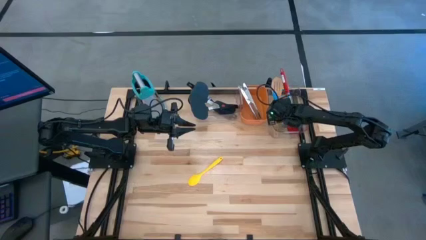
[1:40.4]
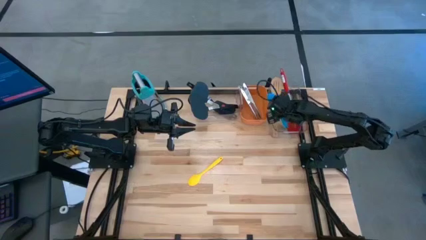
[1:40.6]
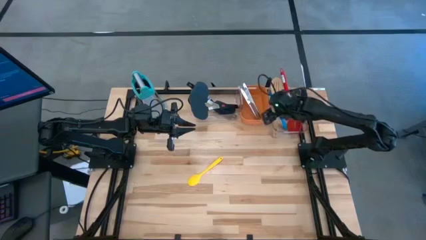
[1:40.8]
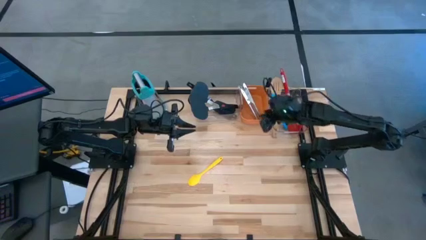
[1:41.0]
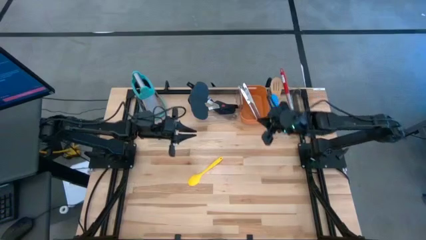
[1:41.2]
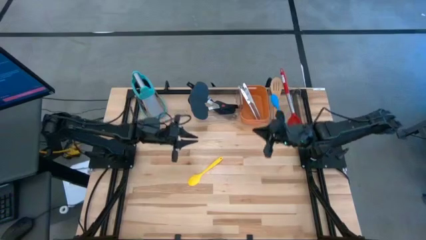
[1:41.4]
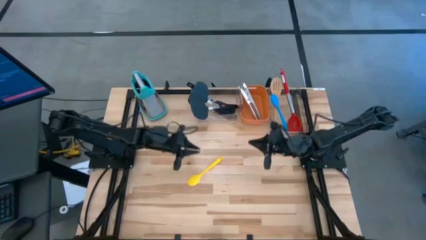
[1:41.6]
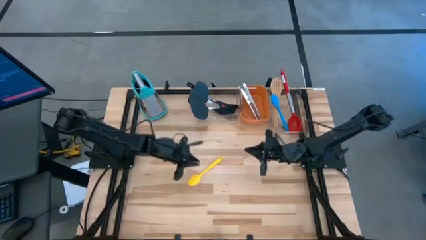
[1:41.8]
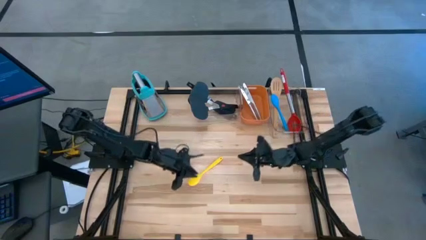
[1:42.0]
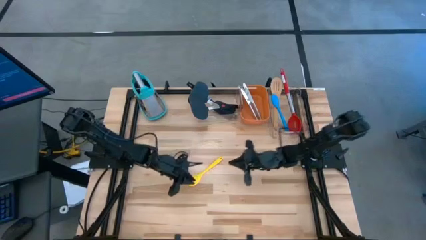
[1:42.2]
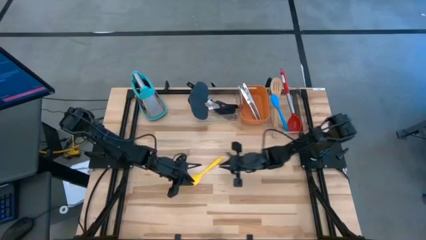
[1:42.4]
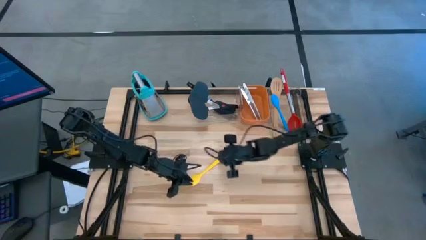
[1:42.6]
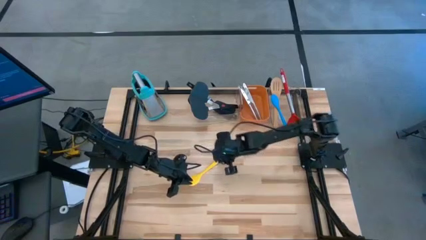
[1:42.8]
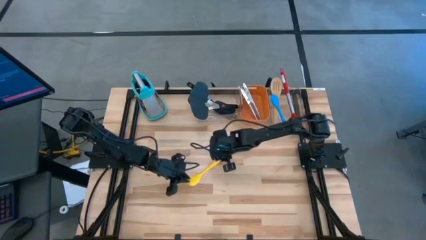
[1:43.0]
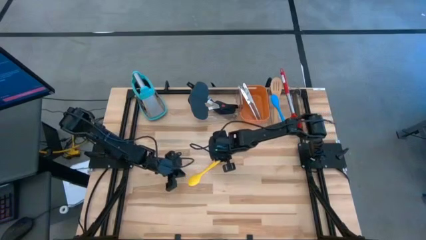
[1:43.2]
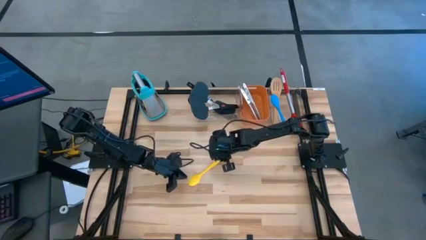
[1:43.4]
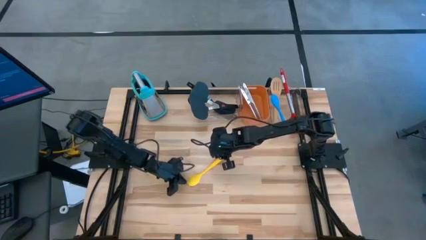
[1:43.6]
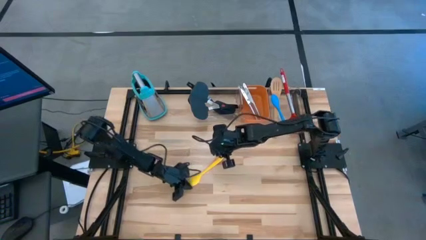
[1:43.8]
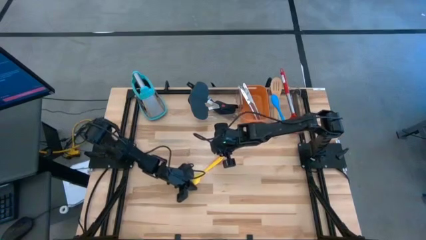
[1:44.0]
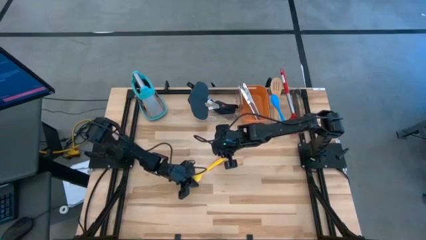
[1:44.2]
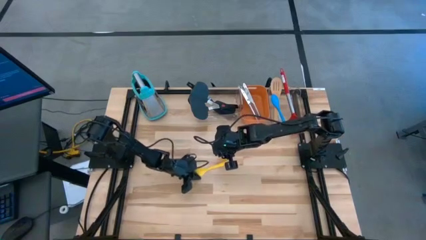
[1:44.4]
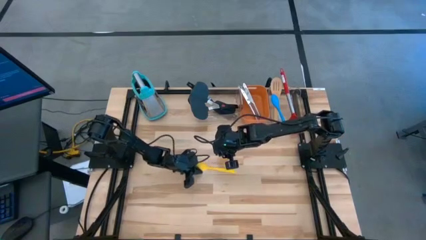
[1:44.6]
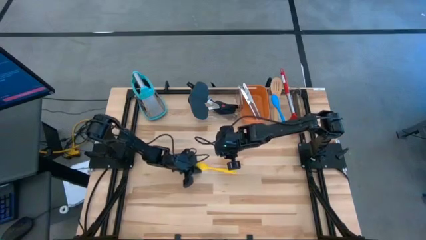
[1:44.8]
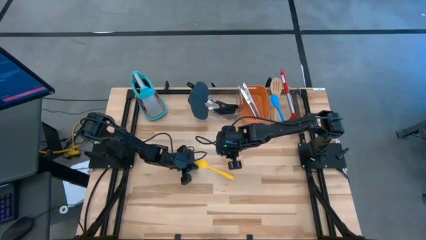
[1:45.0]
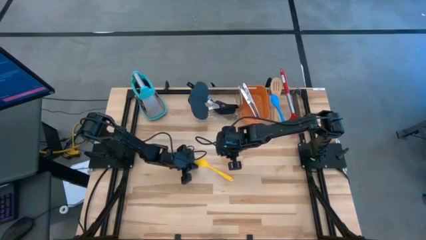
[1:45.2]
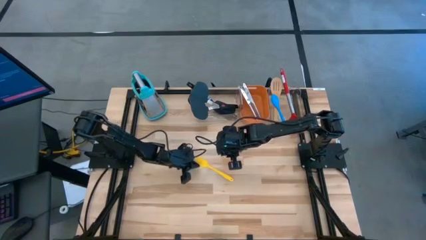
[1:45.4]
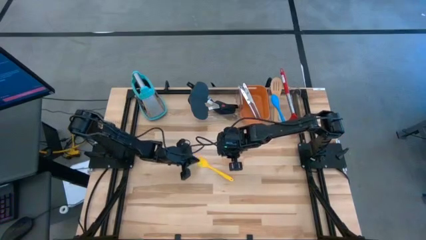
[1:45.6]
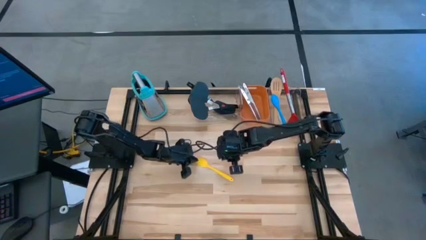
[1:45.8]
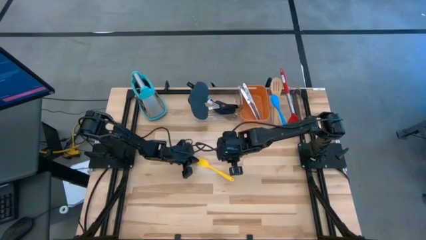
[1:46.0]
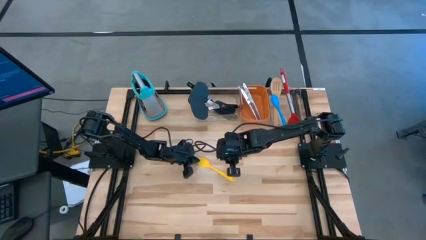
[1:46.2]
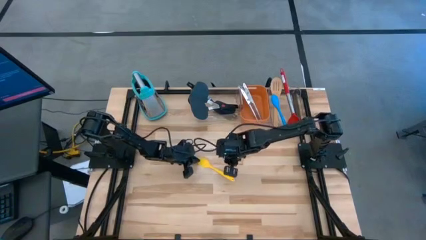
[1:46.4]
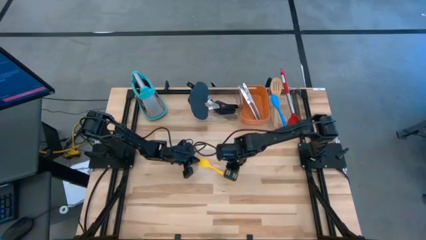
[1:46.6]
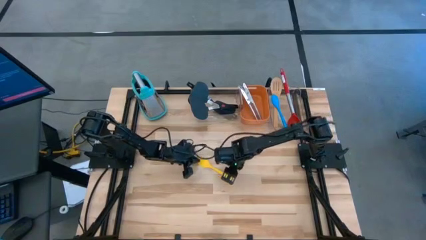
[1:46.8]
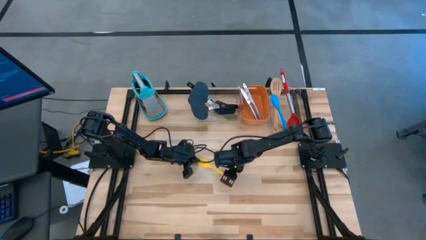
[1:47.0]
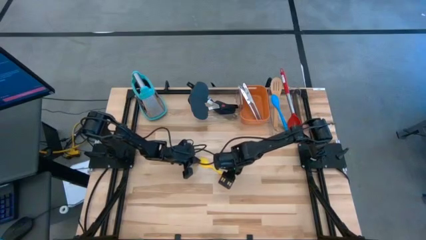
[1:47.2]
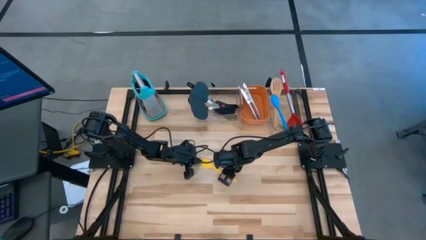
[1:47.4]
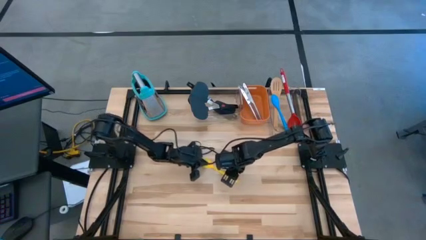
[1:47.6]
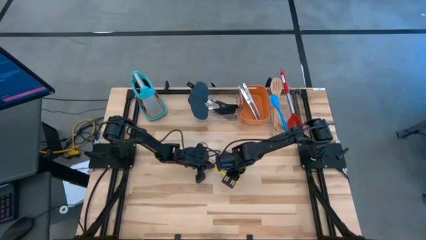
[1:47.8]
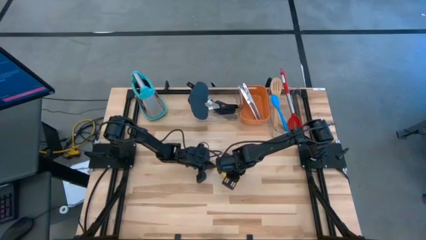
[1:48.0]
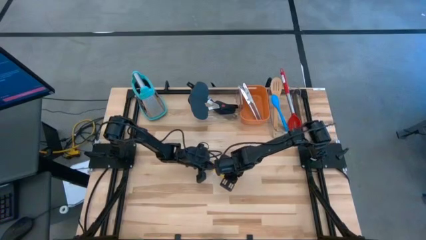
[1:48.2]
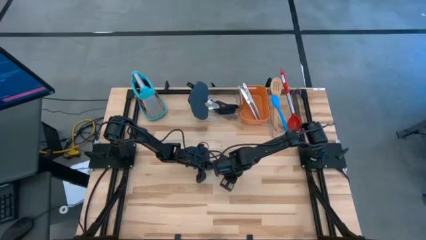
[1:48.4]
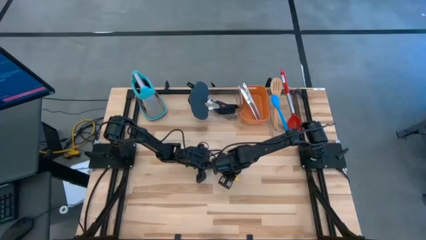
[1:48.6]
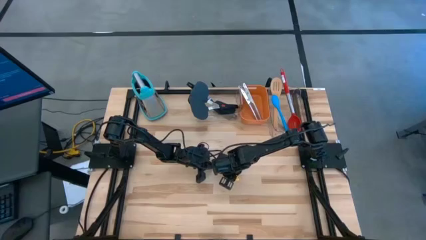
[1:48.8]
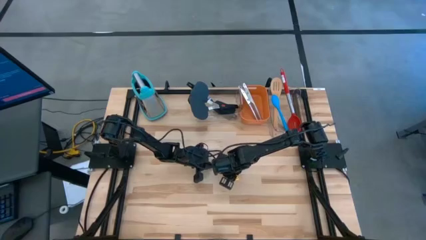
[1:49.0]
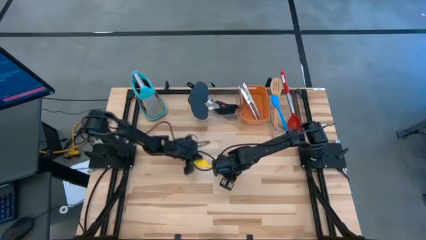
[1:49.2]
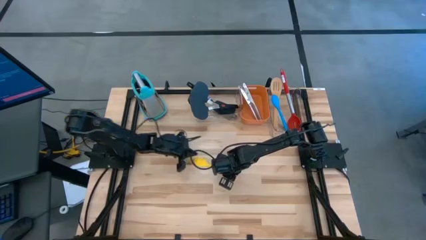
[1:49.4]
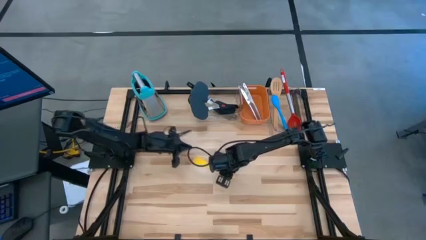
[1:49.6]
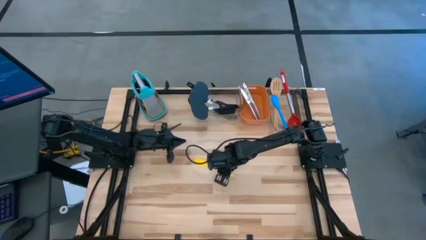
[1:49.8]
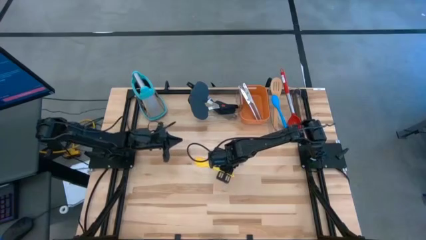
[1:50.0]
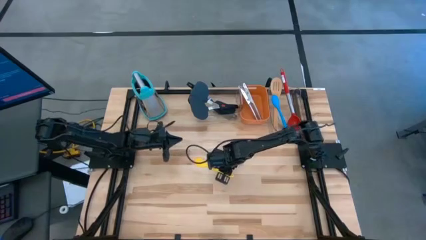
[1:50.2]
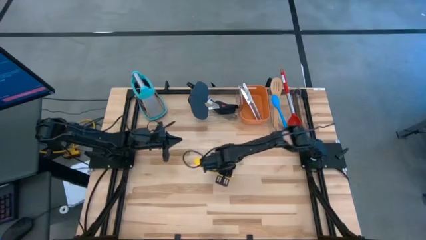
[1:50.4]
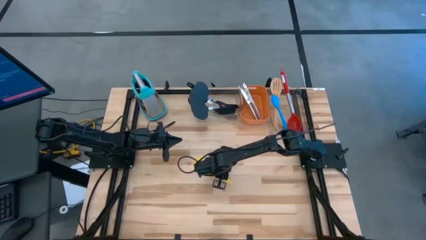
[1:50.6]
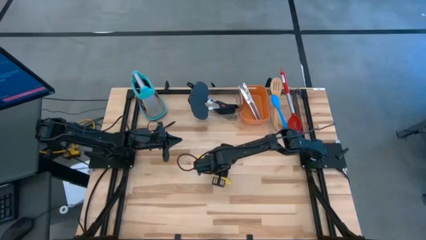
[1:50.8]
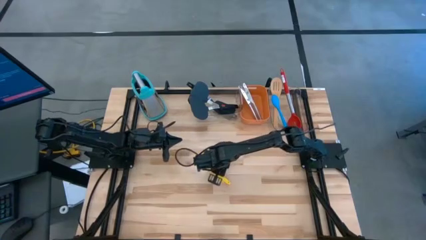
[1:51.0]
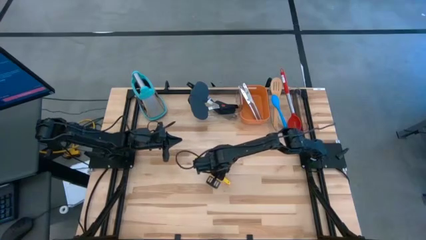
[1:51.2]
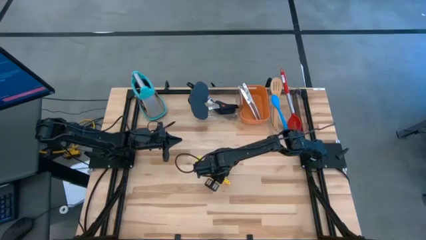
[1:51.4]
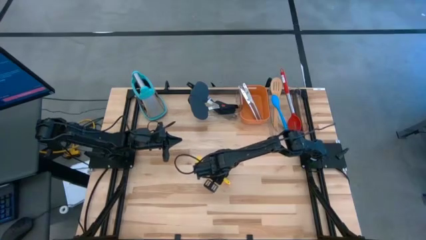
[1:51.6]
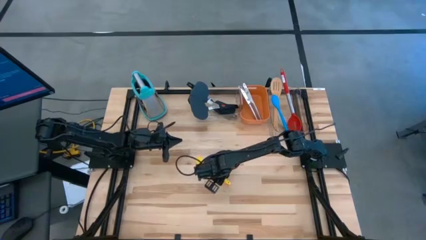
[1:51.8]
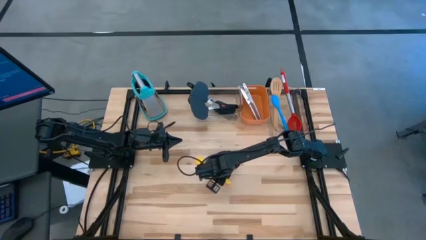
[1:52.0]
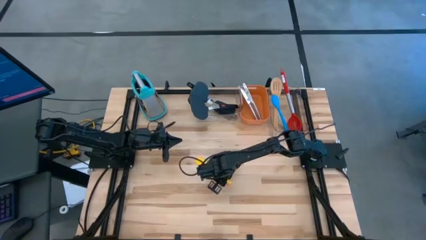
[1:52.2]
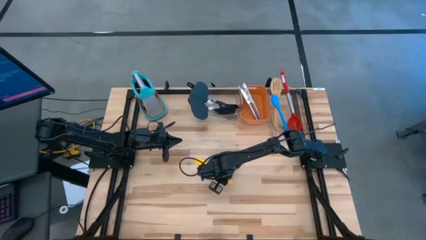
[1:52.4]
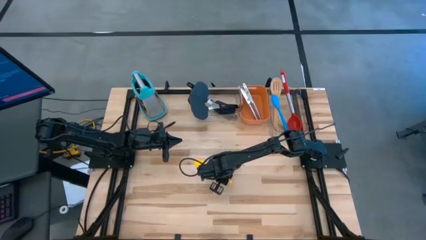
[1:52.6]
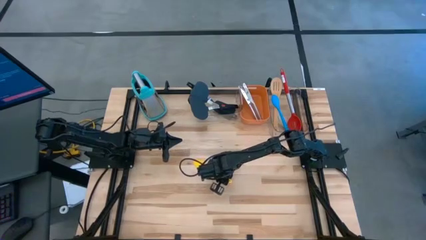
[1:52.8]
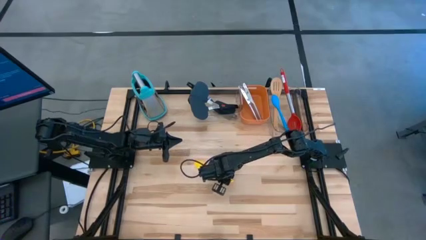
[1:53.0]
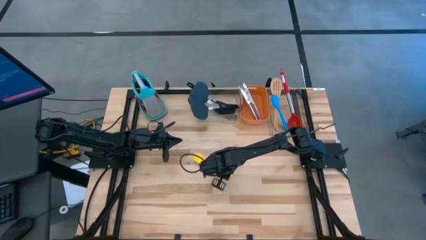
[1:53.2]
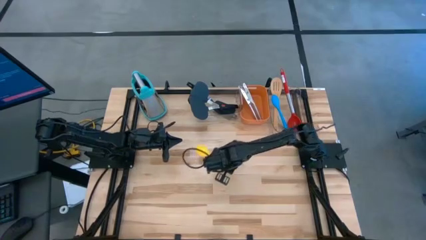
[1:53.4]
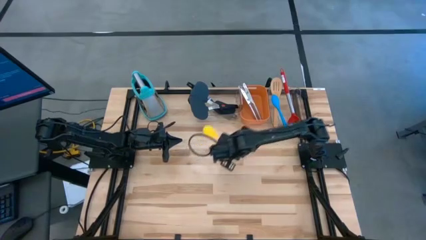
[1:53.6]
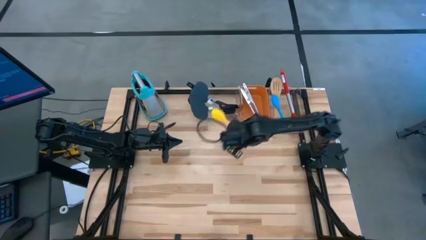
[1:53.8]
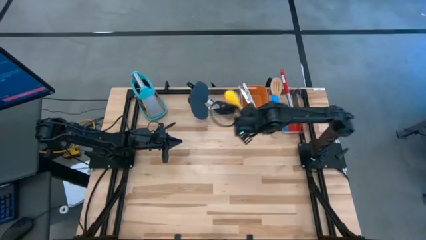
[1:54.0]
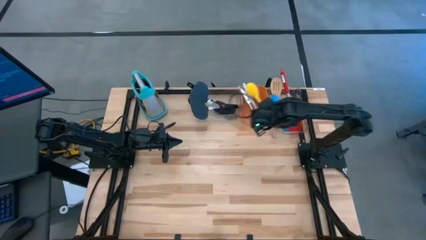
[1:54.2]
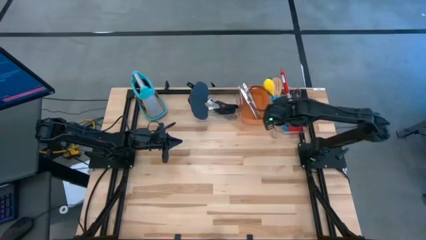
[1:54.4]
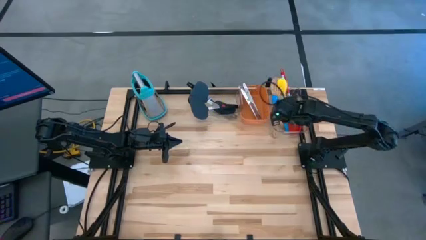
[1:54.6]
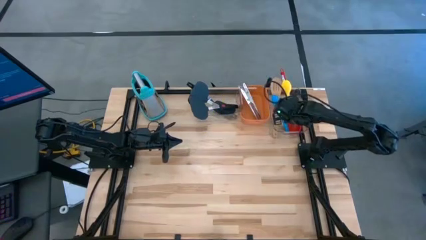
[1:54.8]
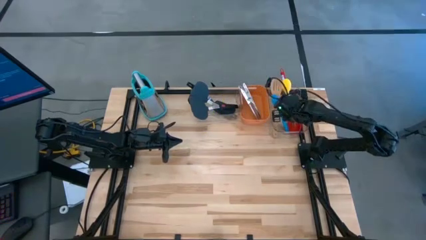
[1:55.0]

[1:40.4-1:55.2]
Task: Pick & Place Kitchen Items
Put the yellow spoon in the right transparent bin
